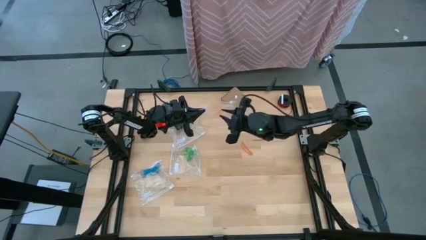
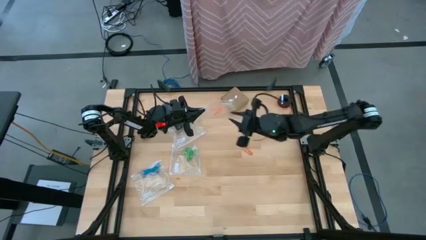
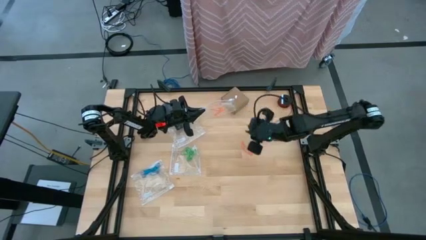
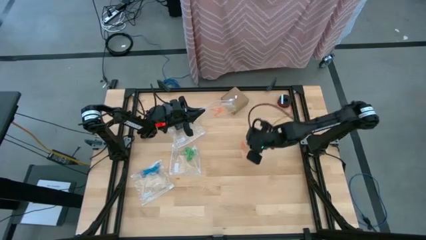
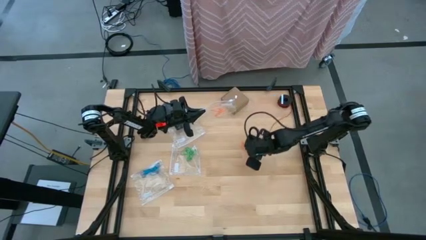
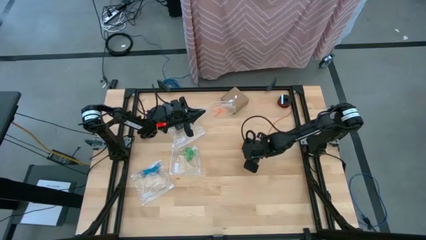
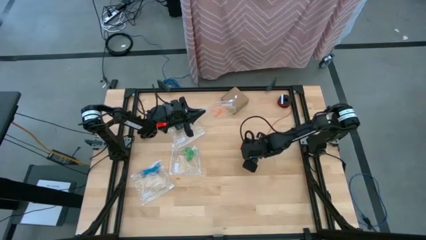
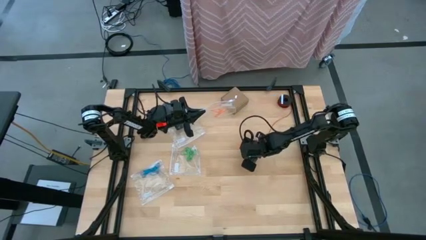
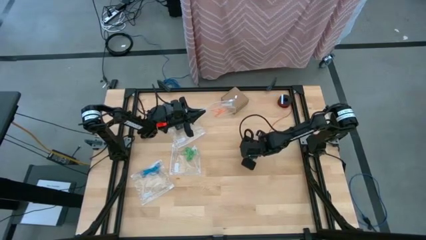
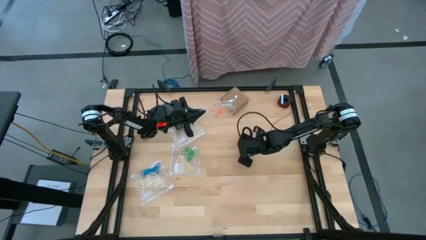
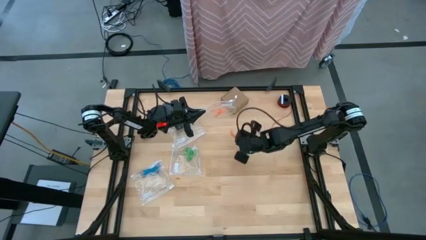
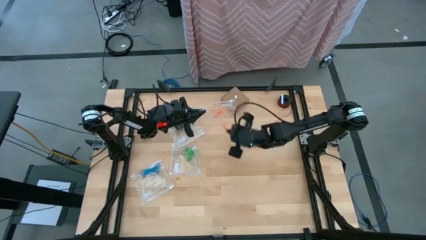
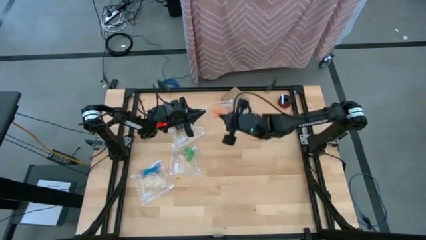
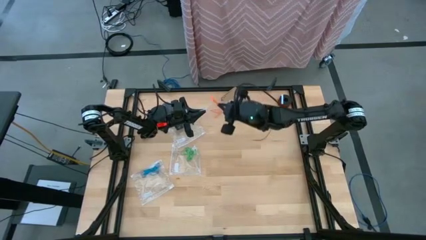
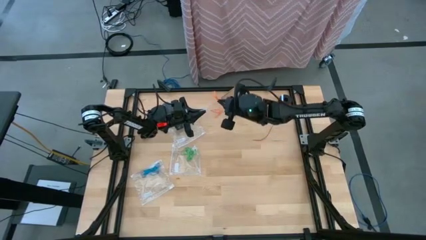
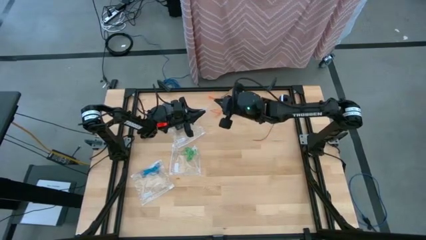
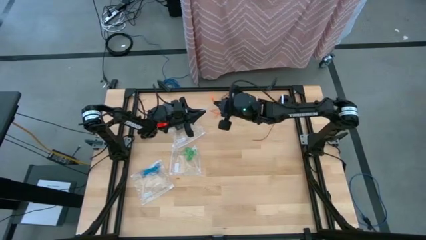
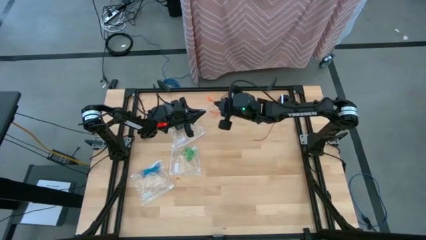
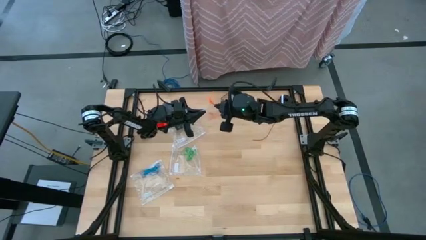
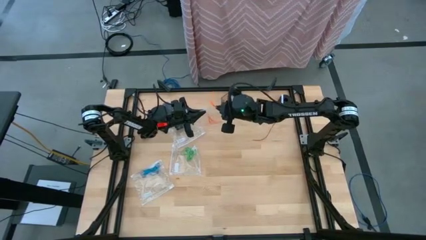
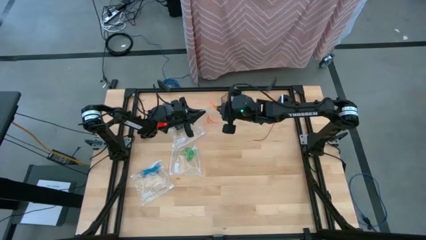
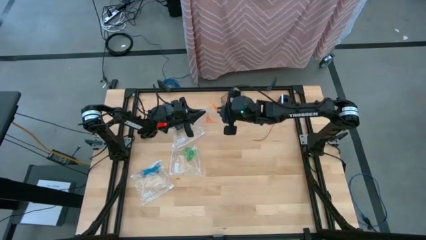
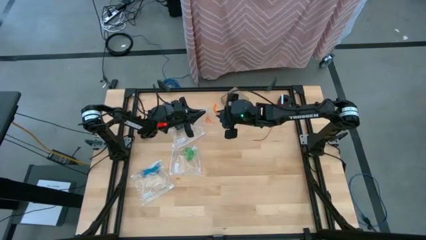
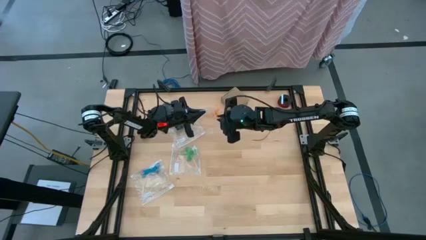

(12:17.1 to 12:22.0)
Task: Sort rubber bands
Put the orange rubber band into the transparent zip bag

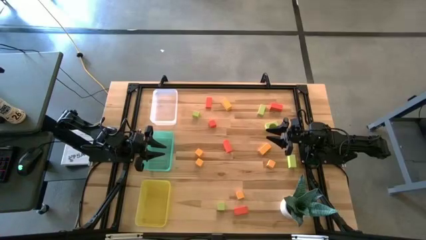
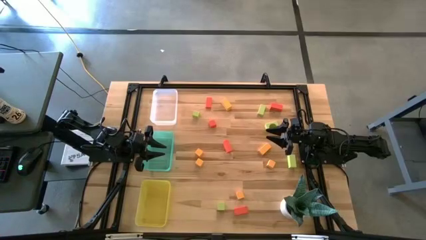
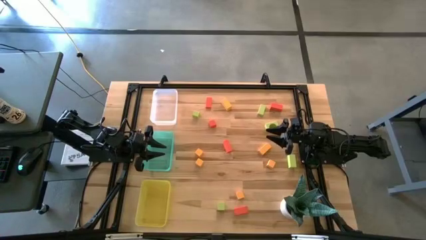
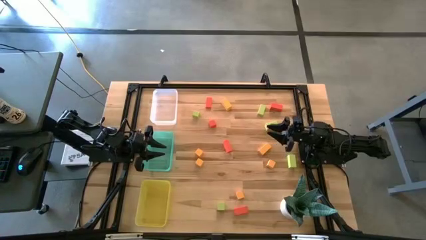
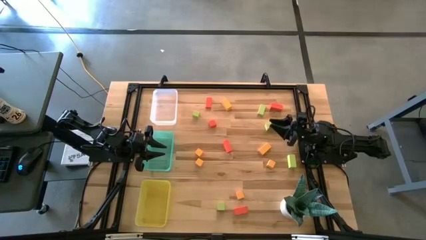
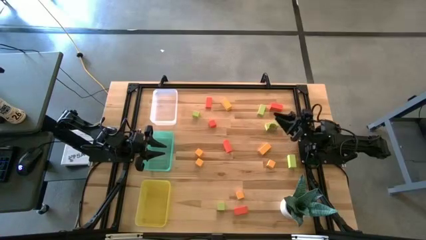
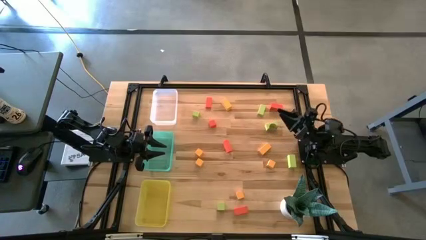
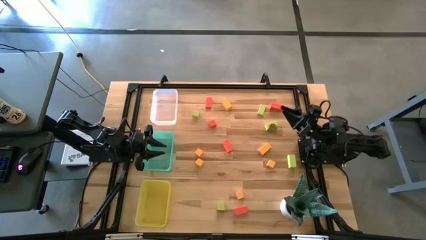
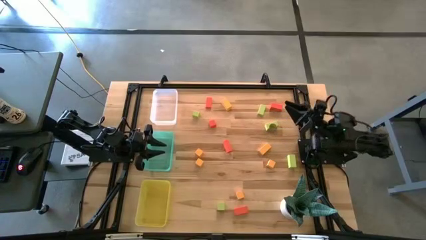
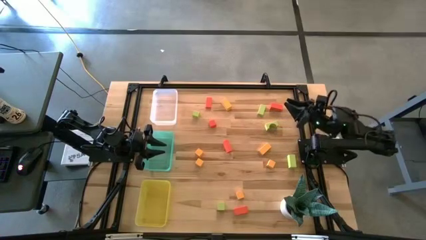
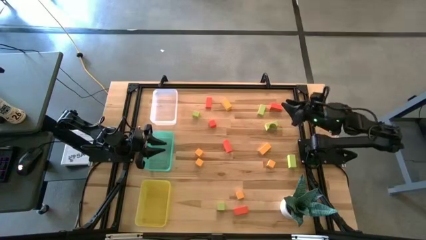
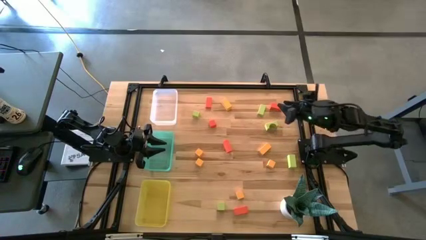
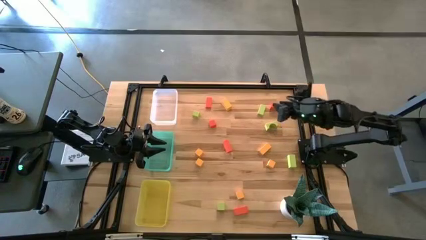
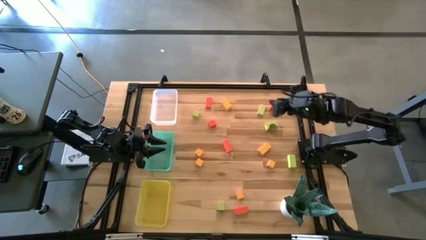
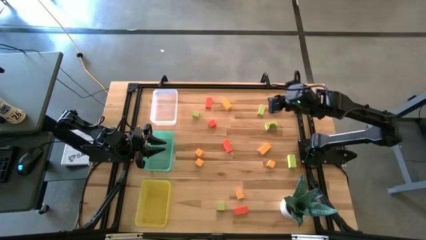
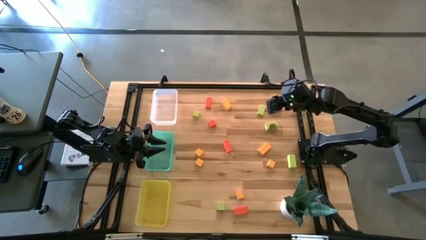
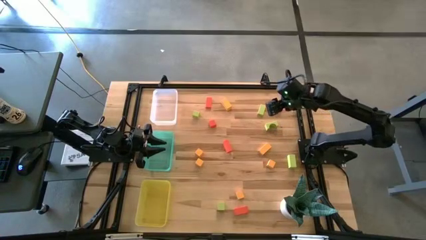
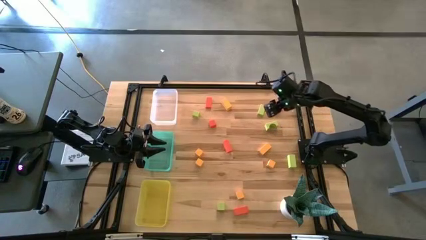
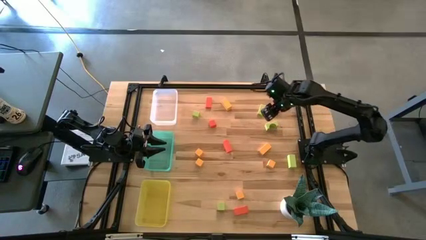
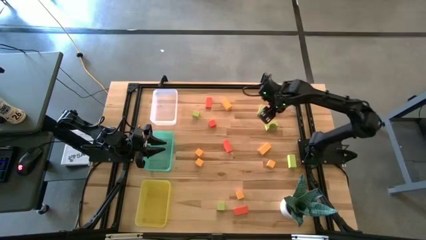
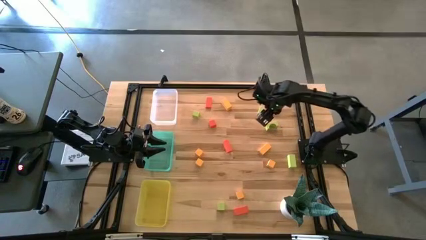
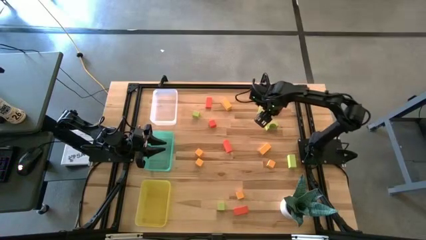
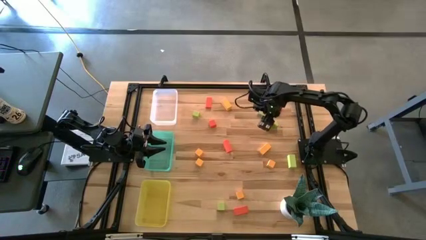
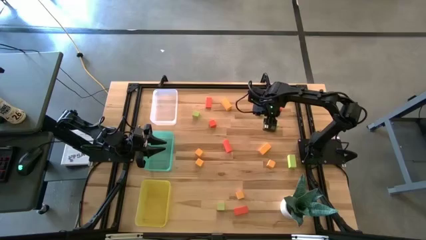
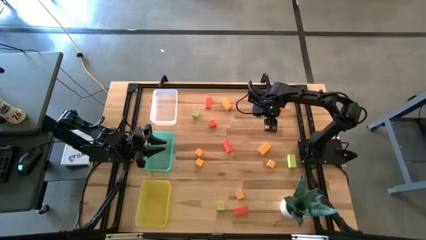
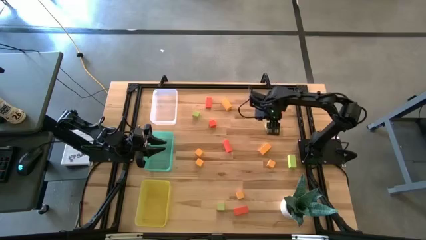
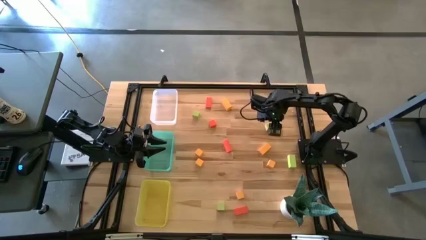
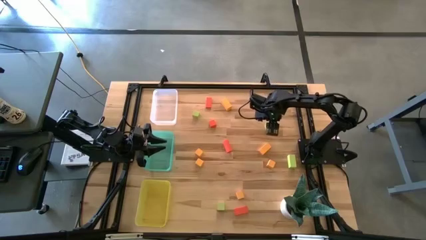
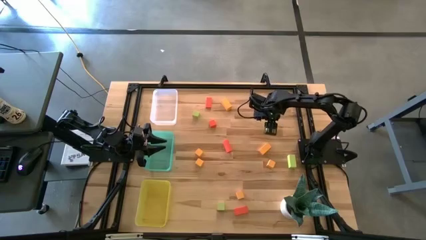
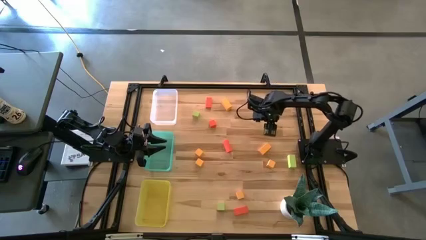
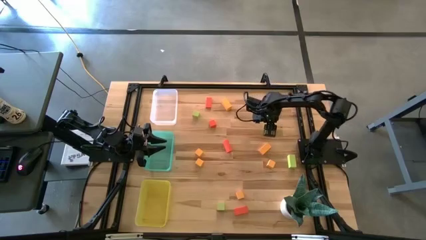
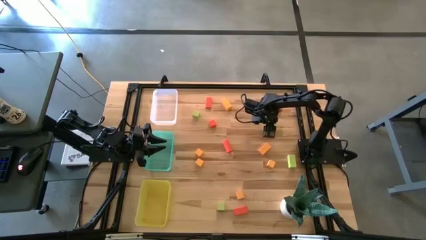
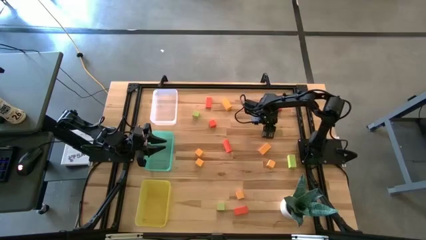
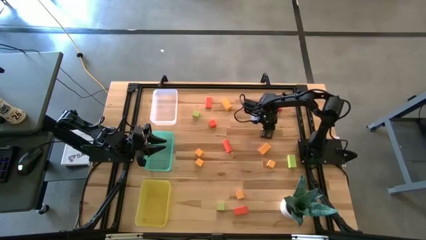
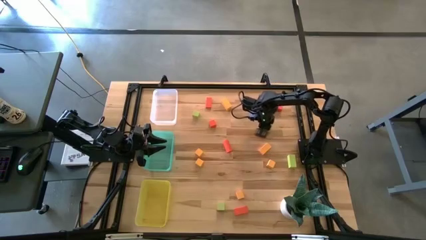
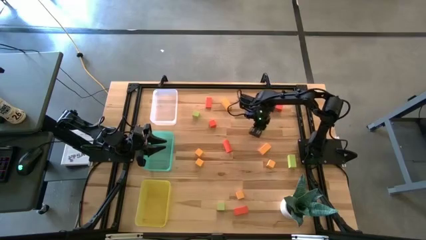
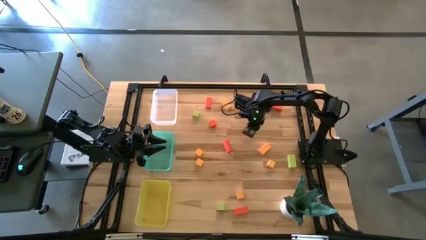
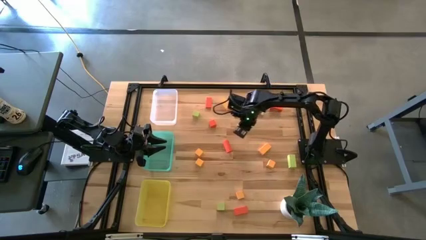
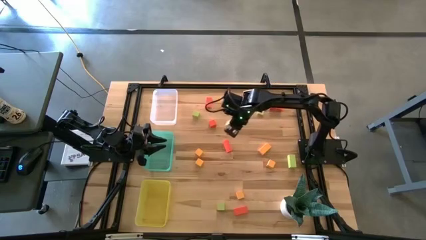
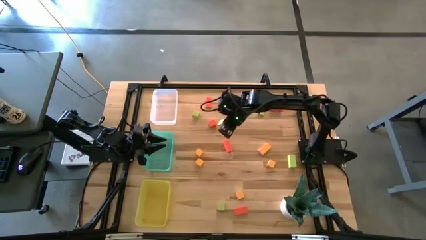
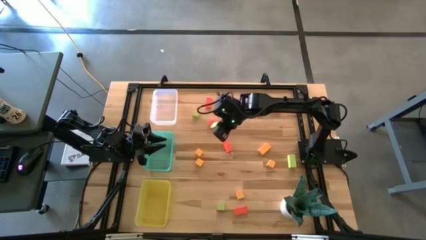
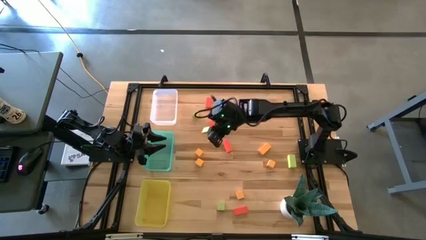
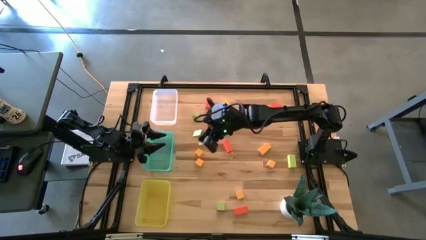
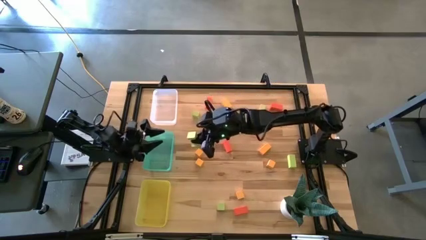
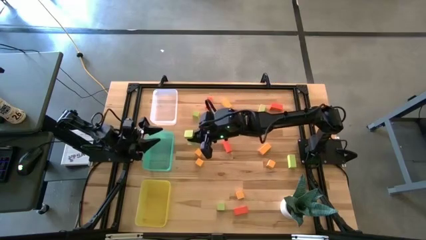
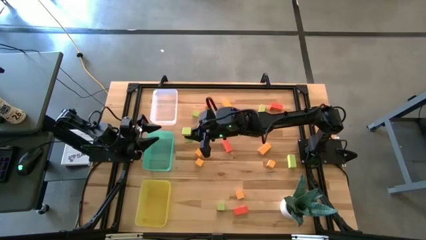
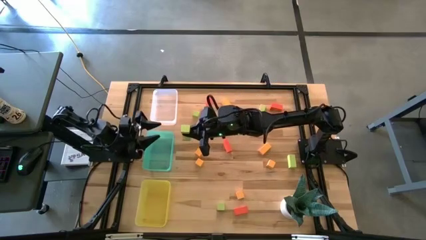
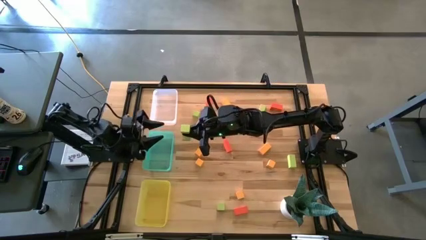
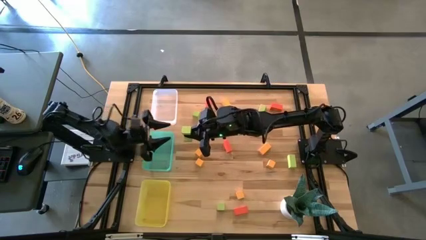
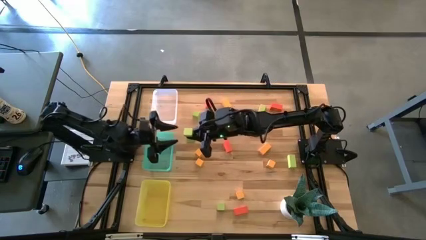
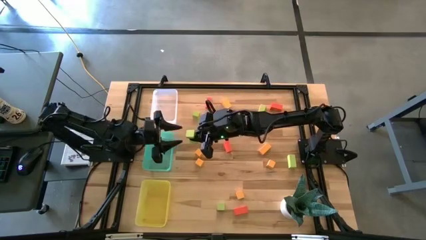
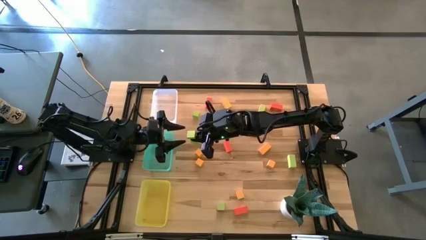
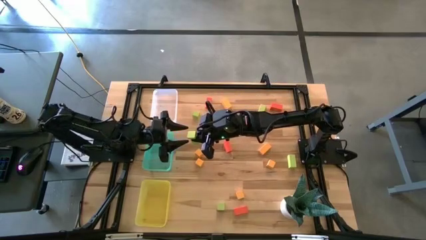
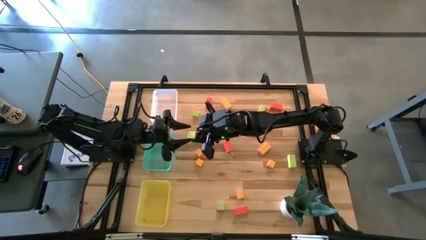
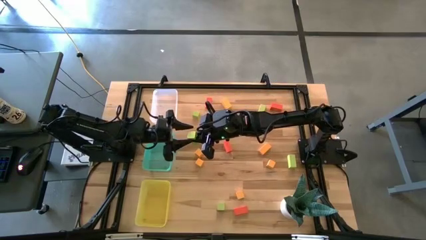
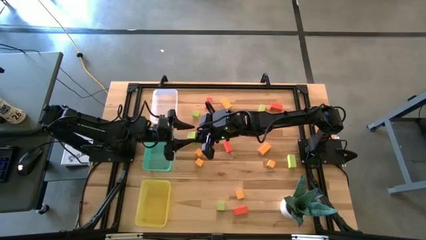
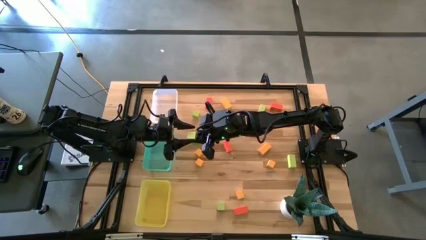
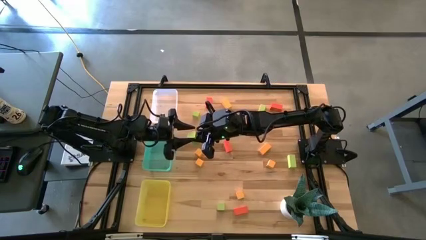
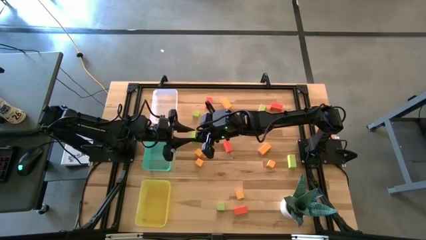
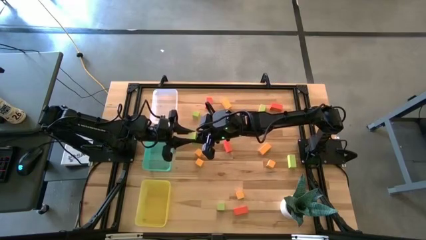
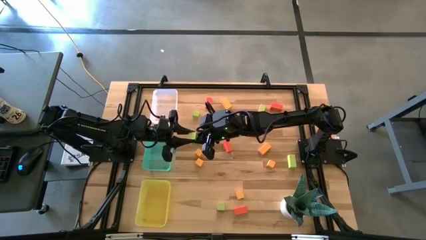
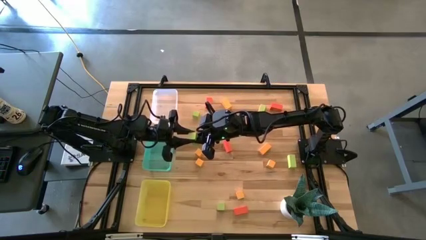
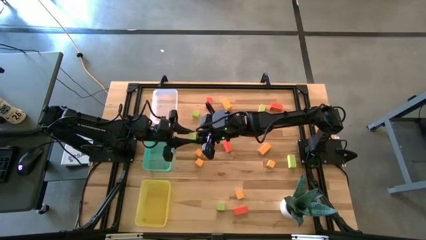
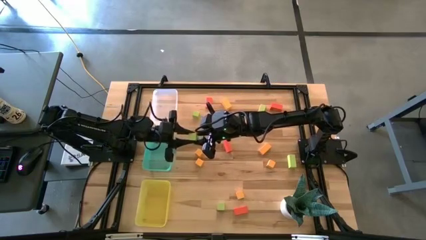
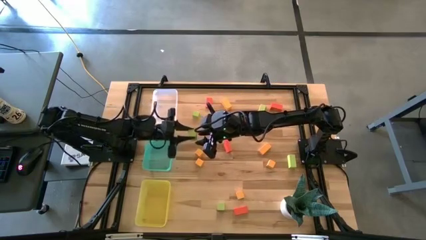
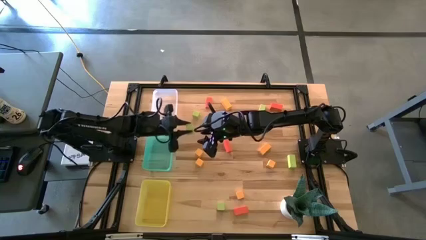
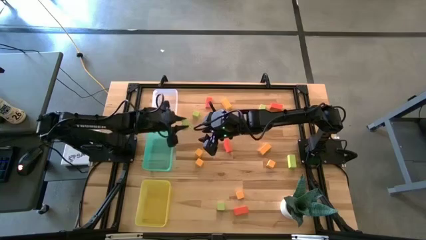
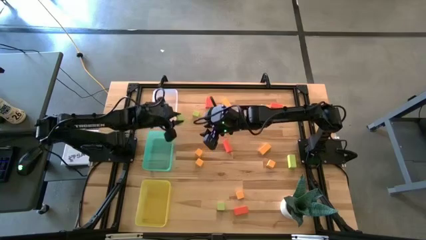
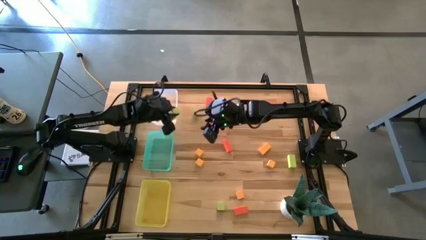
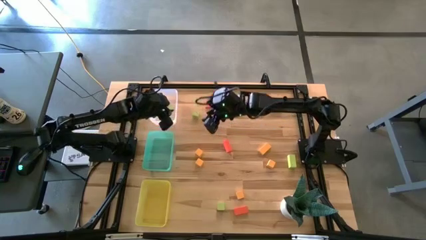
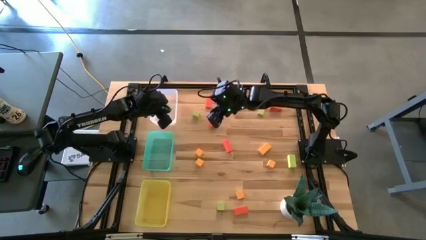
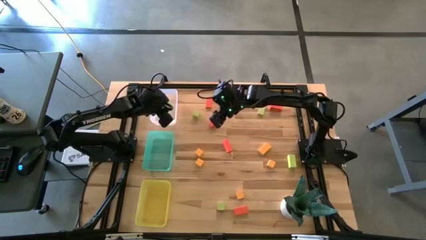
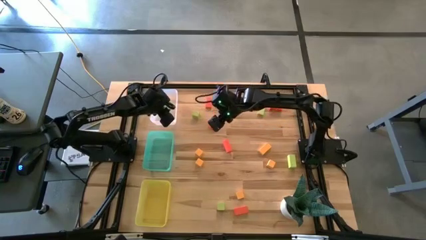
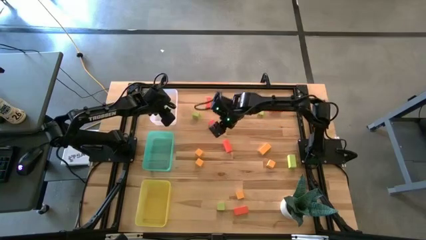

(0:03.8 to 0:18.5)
Task: Sort & place blocks by color
Put the green arch block into the transparent bin
